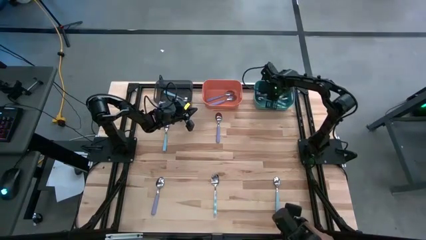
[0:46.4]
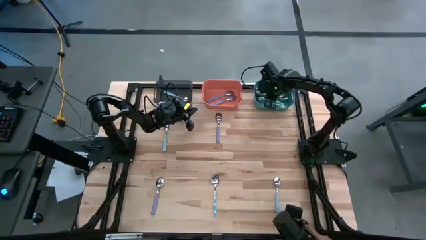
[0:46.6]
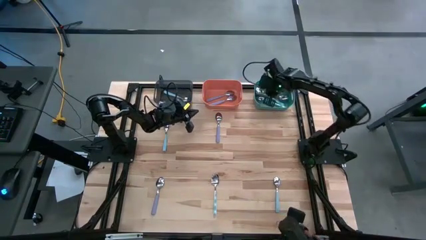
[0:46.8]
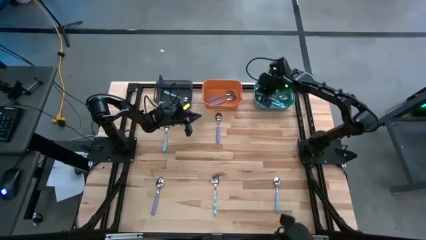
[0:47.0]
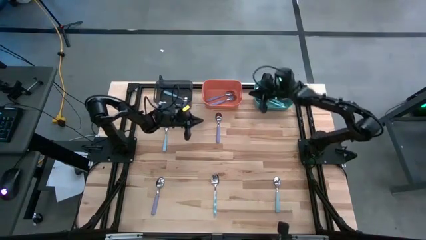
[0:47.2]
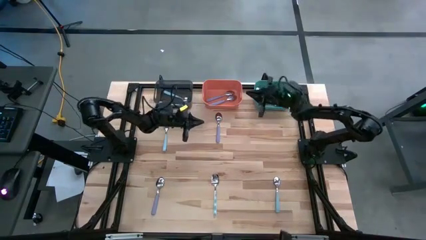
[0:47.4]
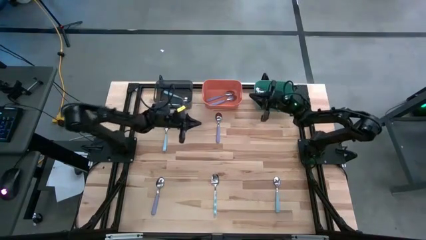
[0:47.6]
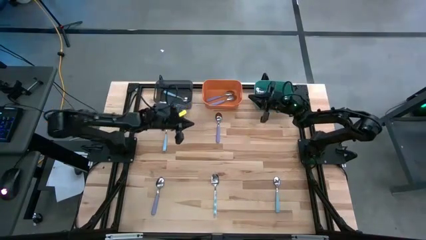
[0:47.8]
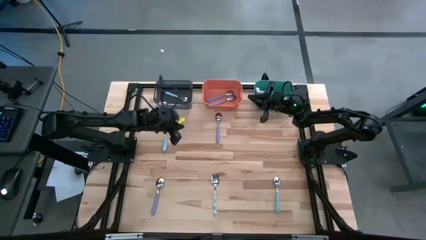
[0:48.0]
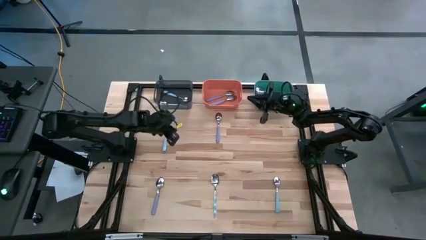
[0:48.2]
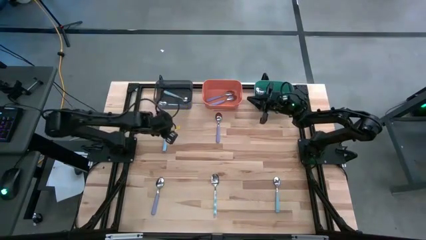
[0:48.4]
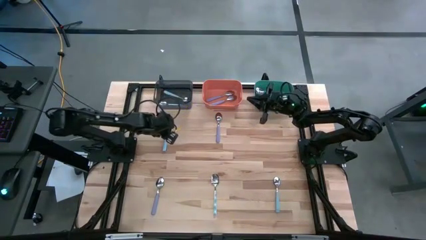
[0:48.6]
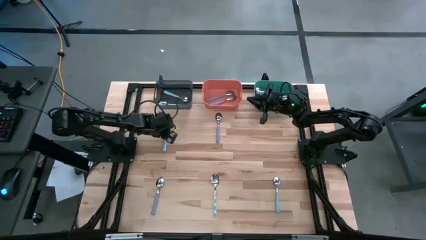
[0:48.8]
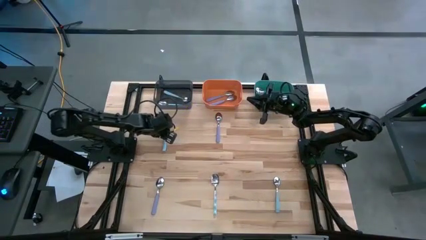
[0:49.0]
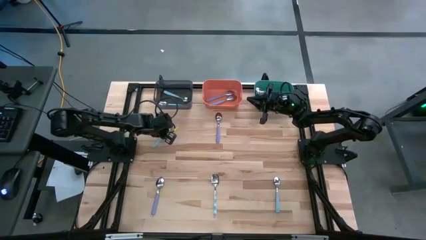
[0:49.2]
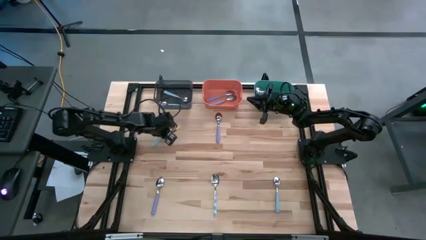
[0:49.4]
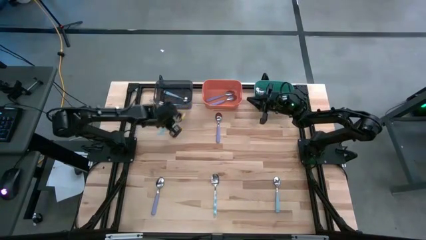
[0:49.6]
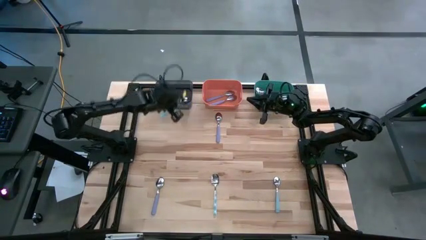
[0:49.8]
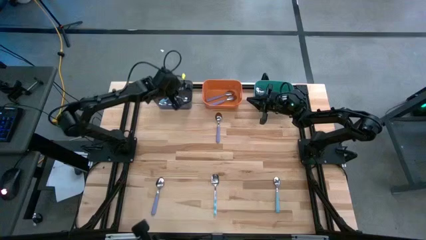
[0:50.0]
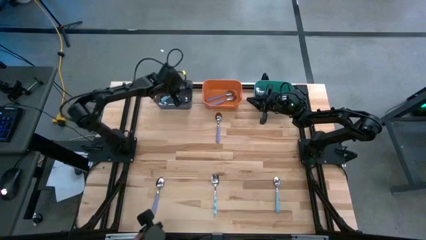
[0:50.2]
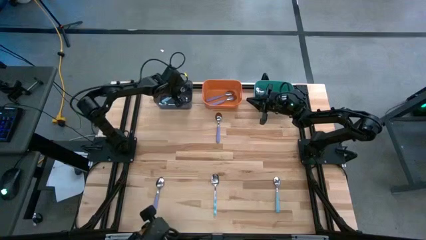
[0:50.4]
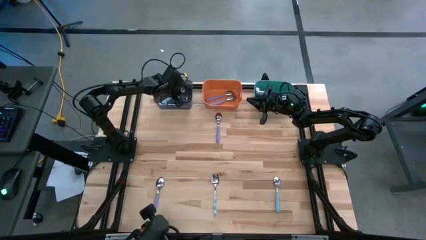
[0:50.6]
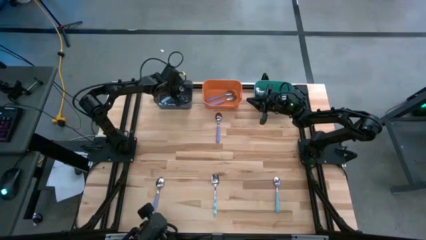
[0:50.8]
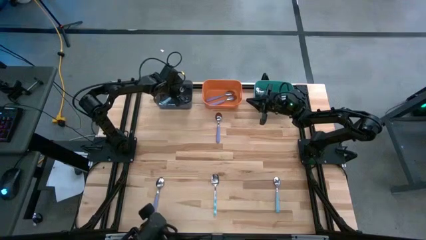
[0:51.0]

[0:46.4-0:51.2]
Task: Sort silverware by color (type)
Put the light blue spoon into the black bin

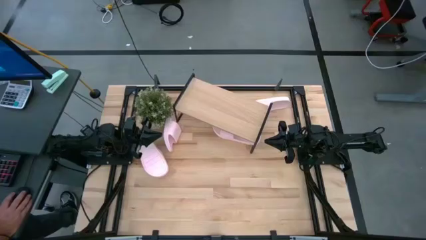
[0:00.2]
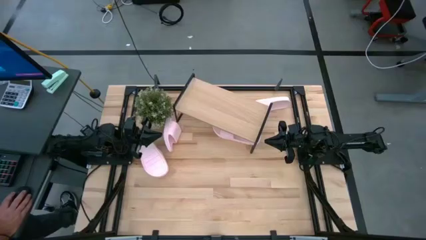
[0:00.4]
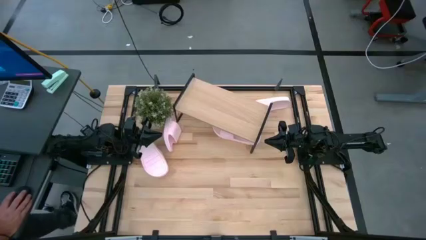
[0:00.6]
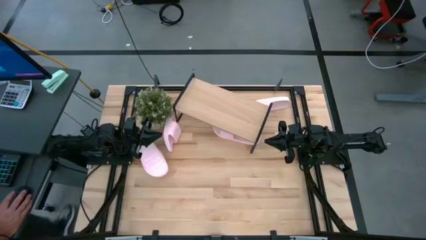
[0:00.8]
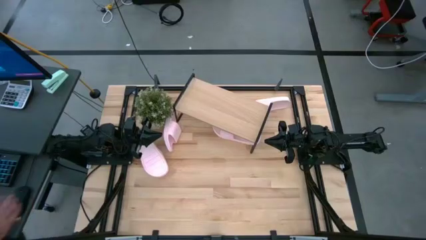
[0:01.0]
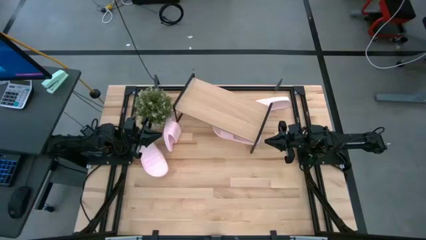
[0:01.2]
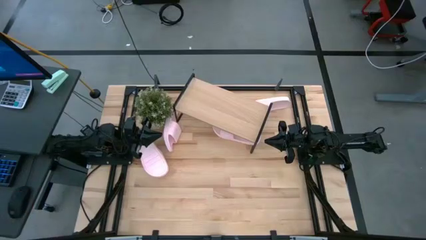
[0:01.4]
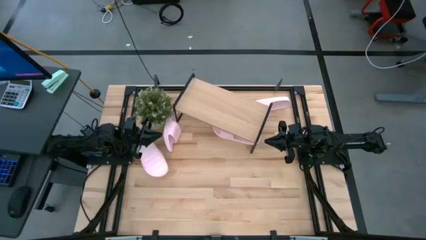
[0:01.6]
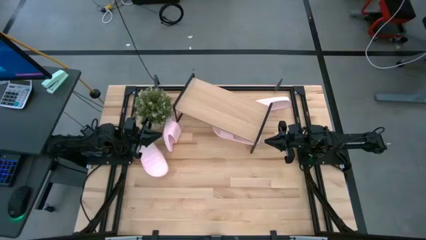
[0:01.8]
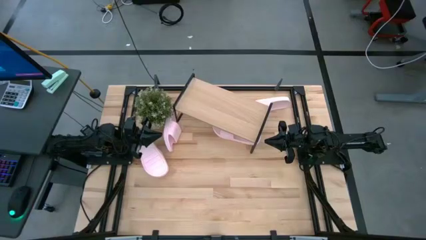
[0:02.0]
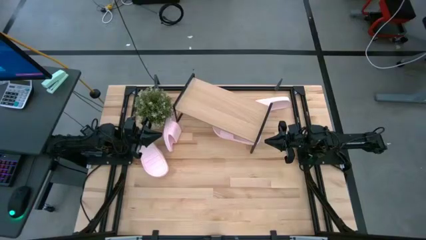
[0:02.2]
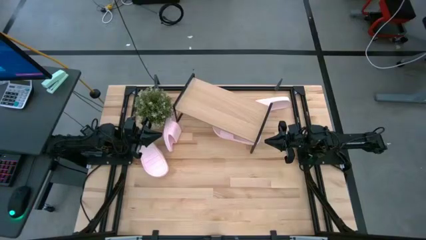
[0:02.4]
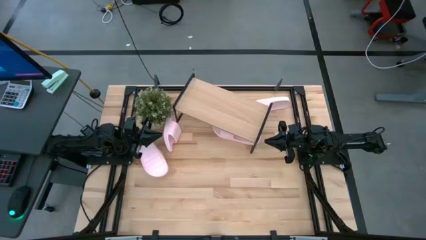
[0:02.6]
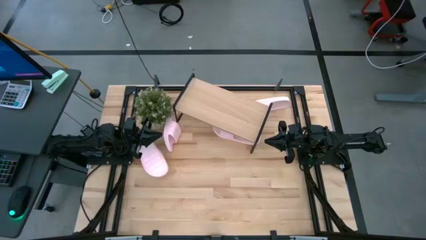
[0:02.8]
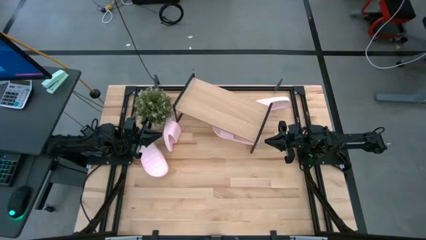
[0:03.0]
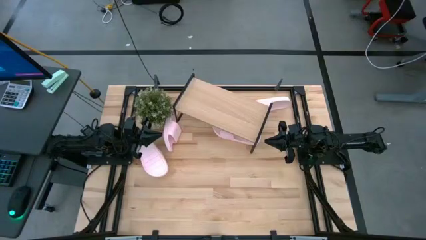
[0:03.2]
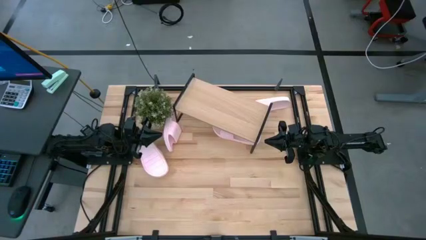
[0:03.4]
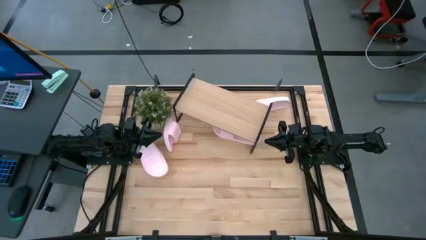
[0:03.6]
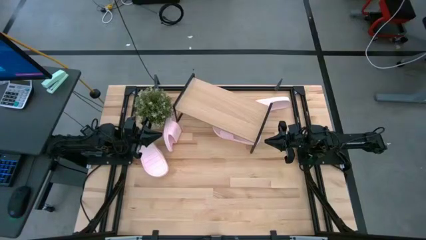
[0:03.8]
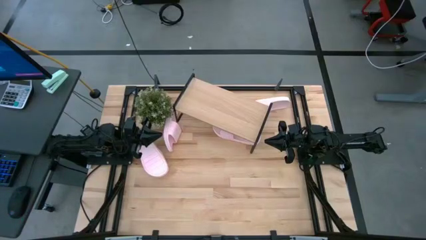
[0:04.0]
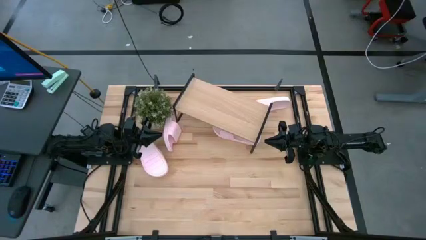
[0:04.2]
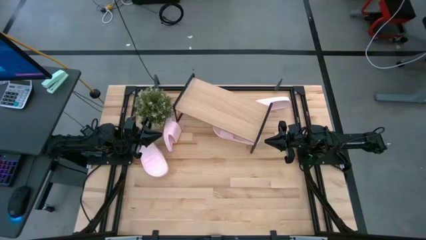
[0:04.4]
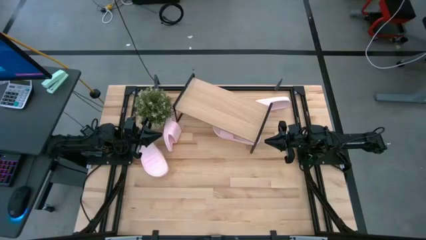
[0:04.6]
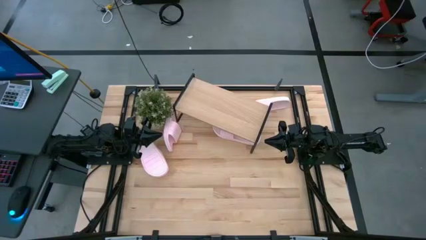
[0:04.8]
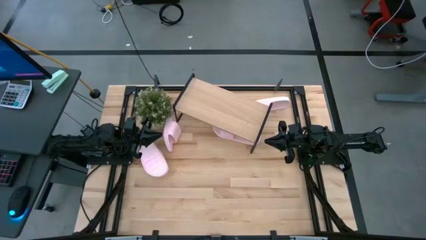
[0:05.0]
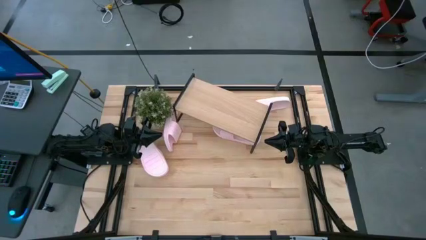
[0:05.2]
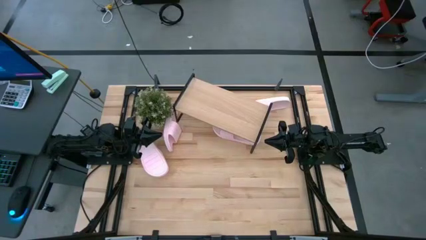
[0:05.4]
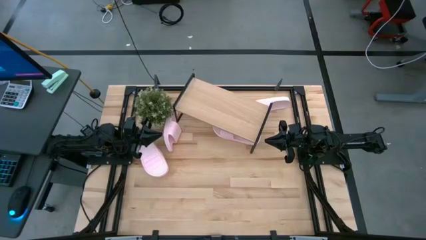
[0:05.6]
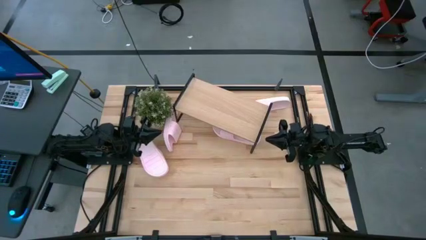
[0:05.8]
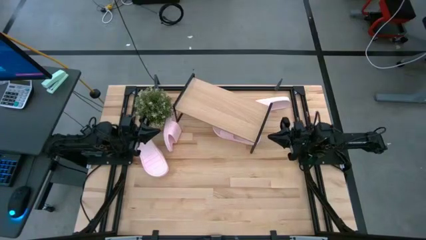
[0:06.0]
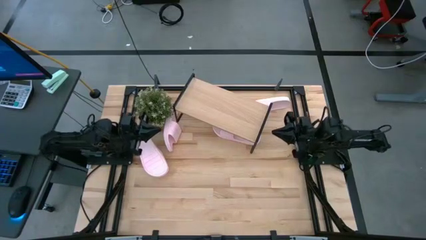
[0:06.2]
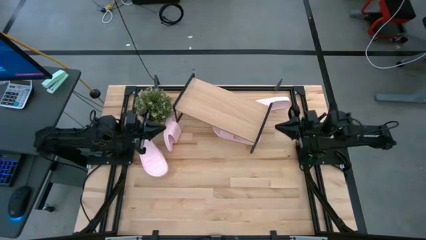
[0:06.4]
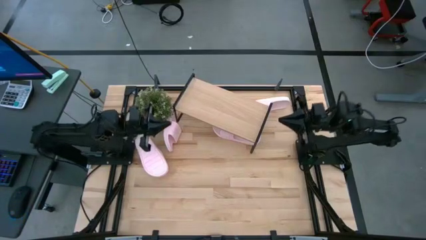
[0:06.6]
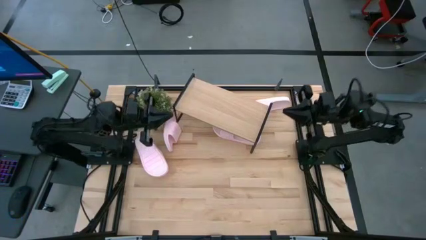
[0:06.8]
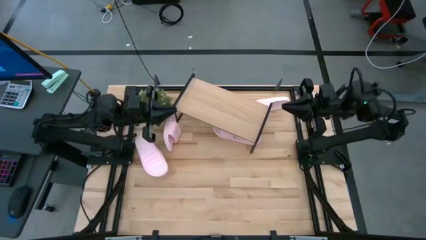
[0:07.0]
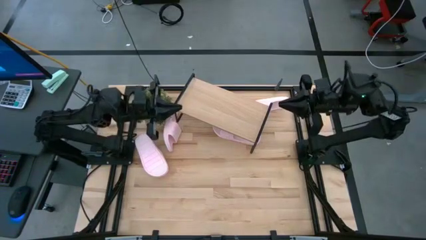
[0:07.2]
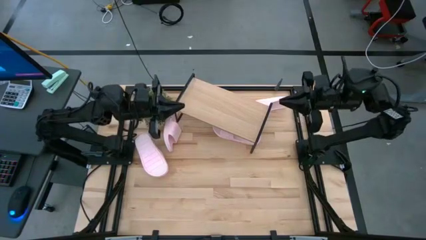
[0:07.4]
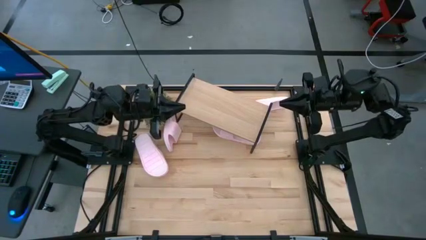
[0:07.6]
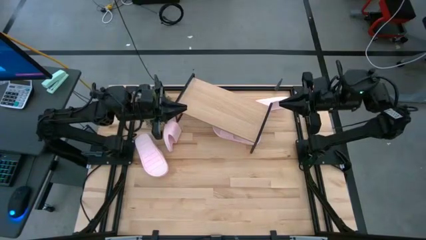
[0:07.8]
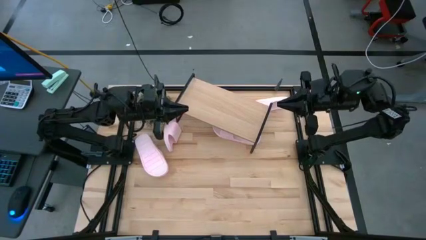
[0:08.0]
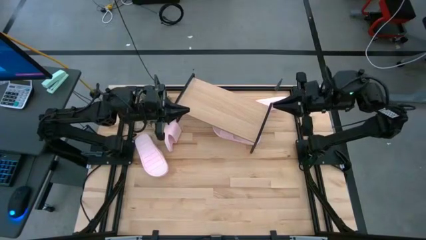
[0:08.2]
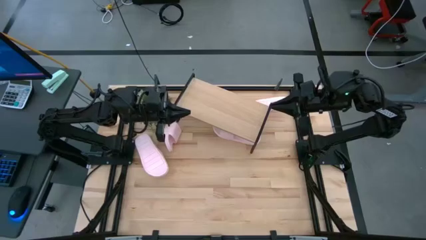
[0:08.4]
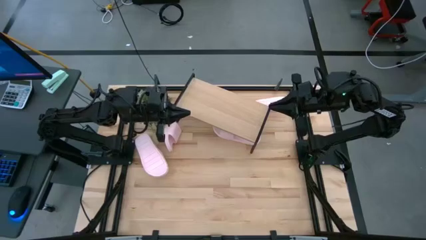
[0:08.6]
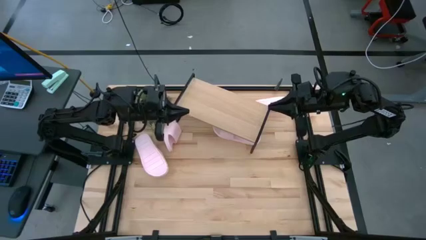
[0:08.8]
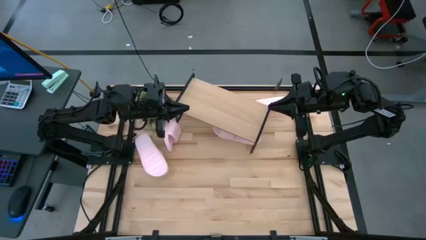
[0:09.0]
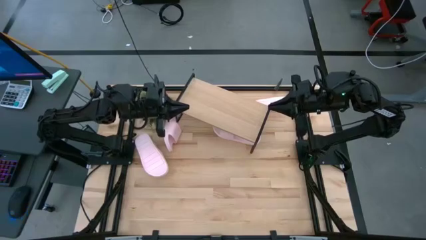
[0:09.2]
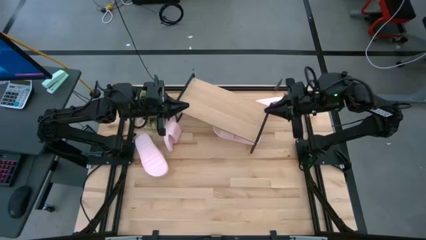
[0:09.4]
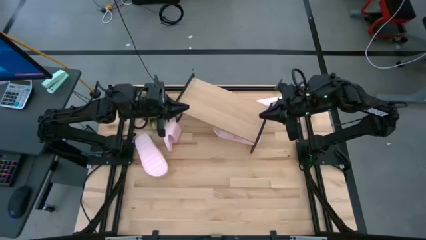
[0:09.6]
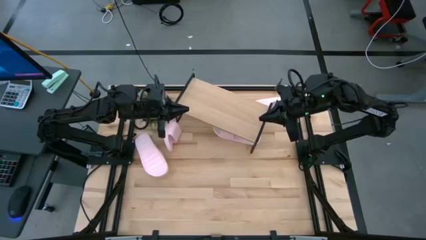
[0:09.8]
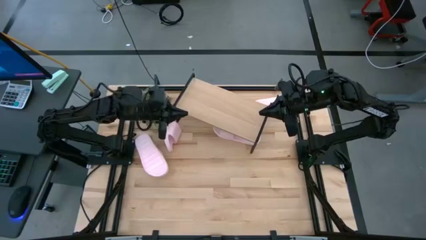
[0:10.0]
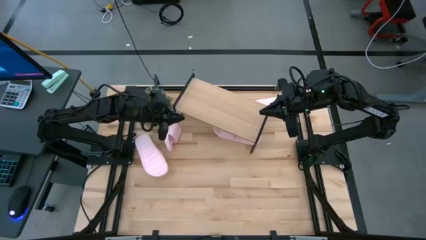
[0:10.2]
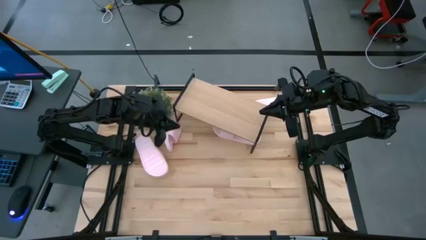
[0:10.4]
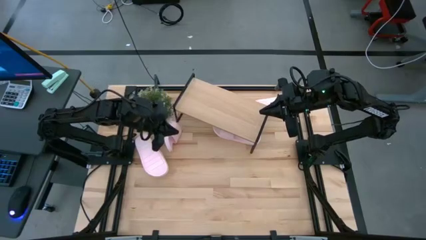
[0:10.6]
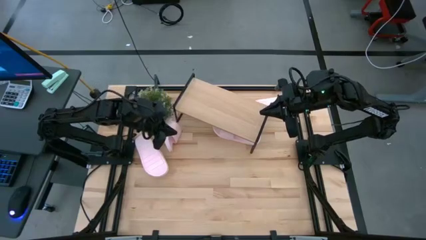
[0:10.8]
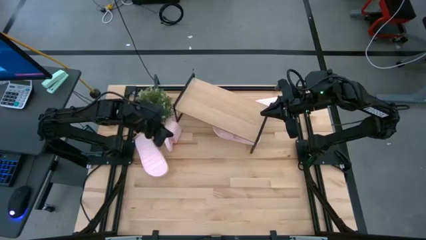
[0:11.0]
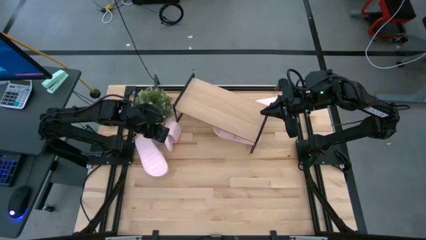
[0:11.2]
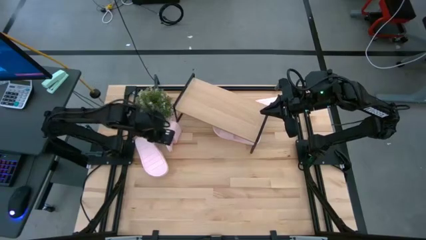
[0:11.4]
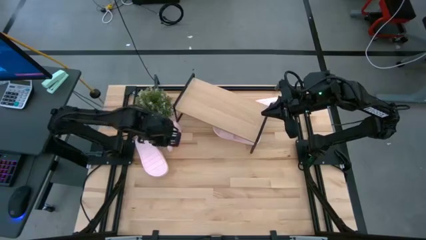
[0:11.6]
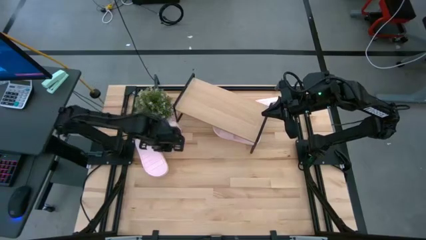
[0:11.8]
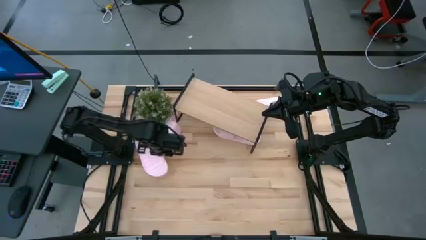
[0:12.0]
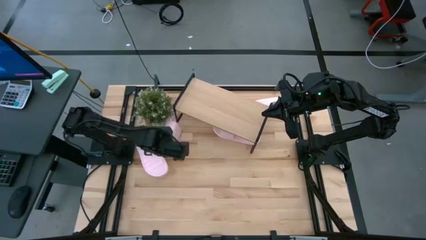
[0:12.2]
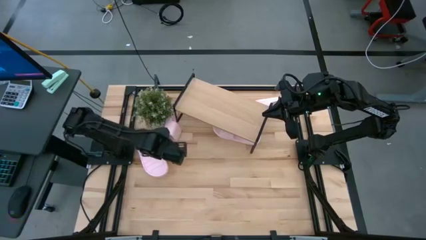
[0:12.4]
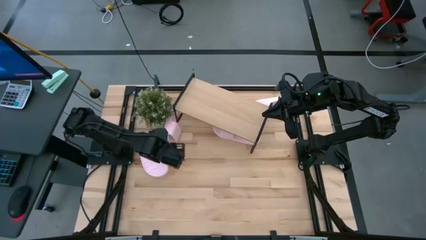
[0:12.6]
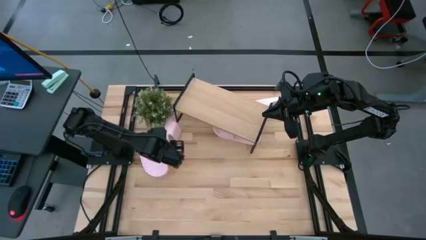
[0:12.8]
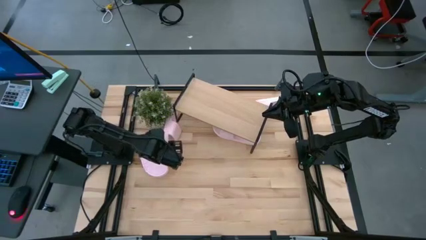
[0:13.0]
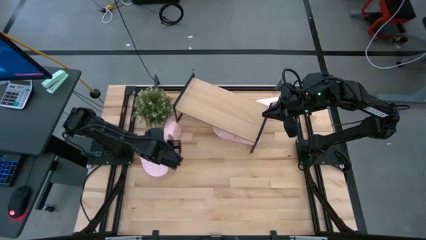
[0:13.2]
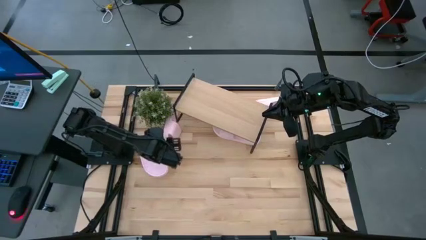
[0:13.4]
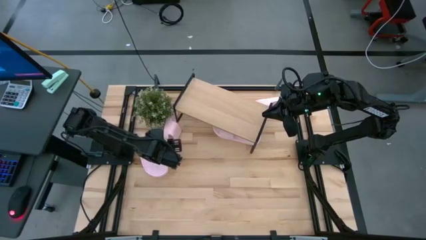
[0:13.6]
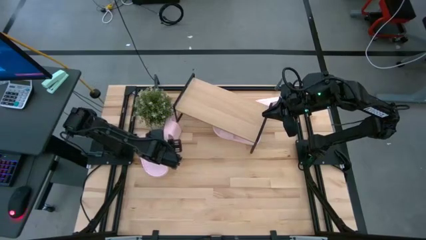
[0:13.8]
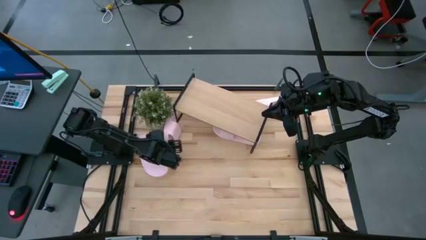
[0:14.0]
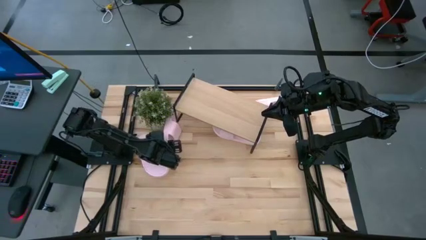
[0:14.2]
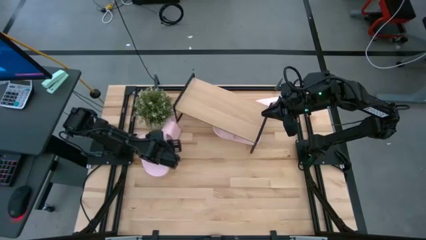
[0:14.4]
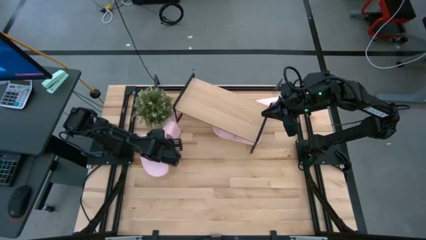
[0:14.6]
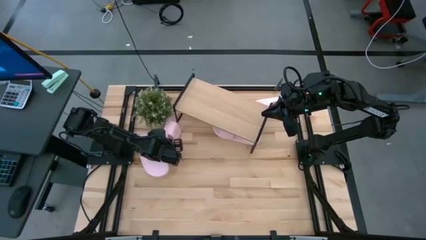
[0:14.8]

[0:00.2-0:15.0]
Task: Pick and place slides into the shelf
Put the pink slide on the shelf
